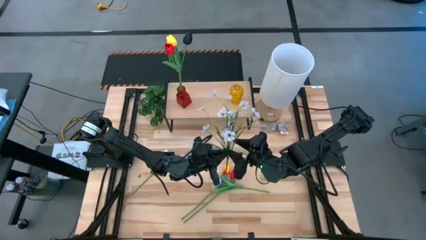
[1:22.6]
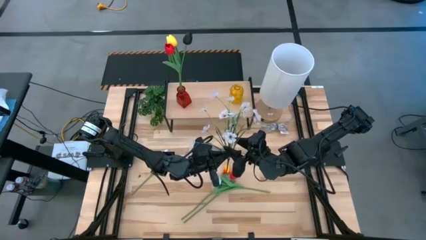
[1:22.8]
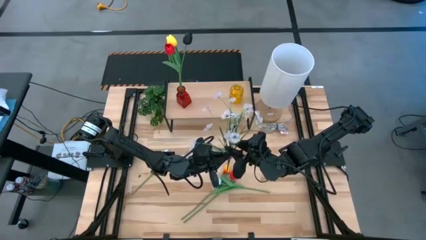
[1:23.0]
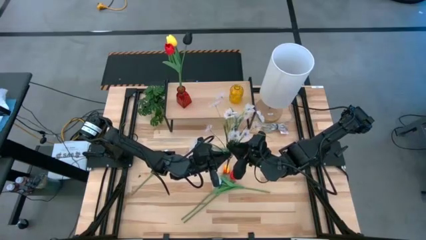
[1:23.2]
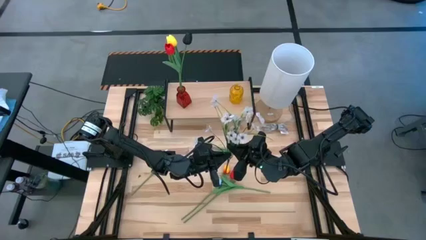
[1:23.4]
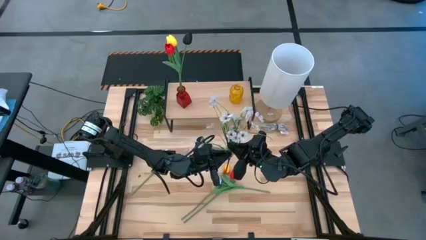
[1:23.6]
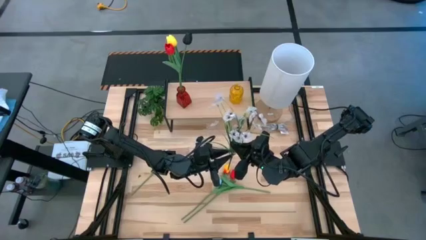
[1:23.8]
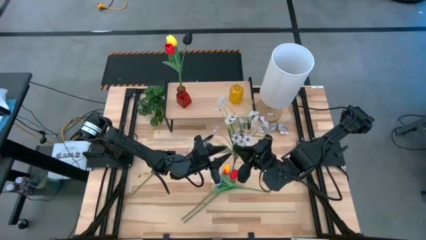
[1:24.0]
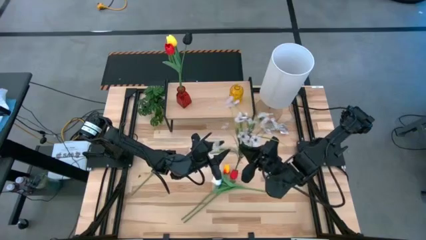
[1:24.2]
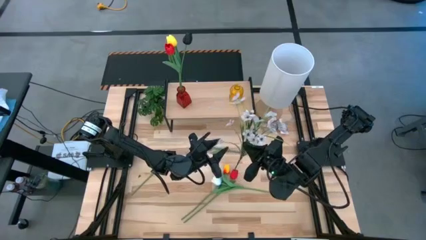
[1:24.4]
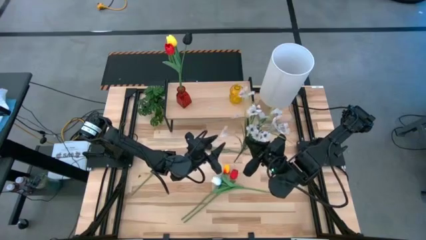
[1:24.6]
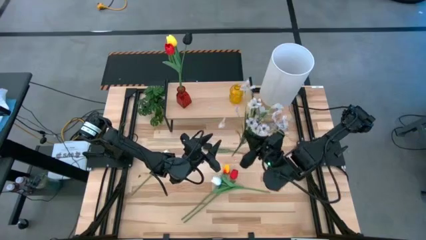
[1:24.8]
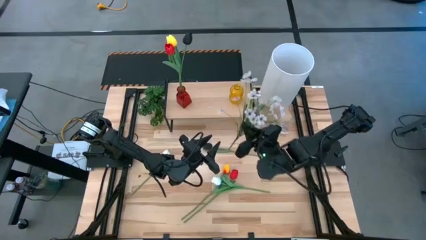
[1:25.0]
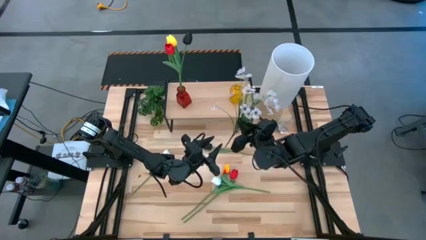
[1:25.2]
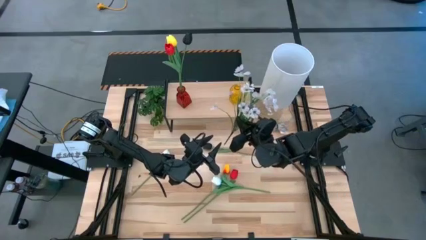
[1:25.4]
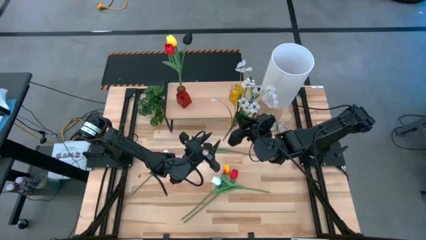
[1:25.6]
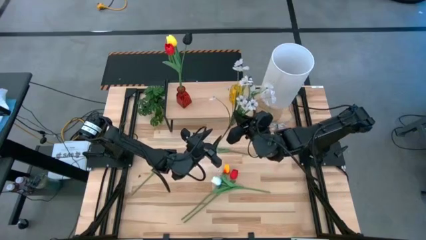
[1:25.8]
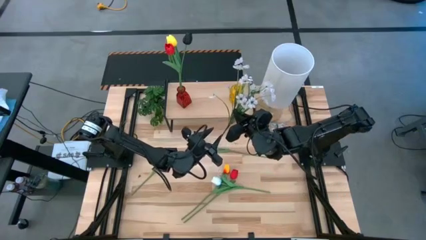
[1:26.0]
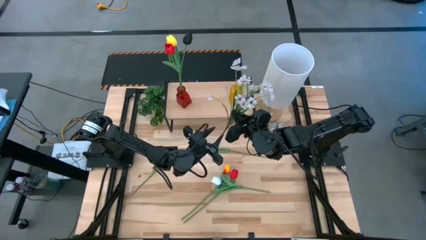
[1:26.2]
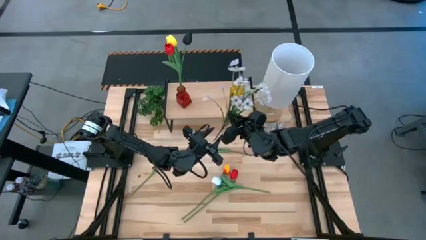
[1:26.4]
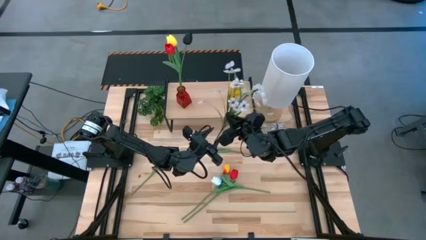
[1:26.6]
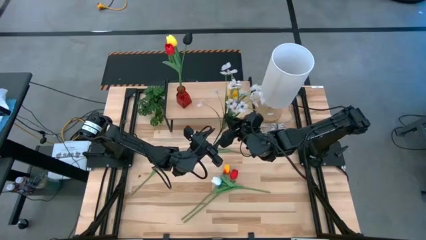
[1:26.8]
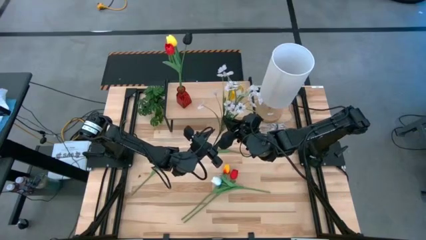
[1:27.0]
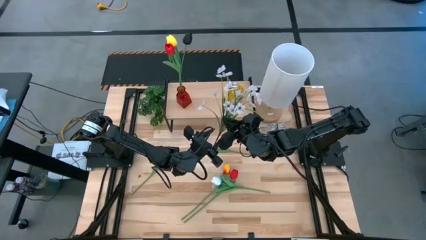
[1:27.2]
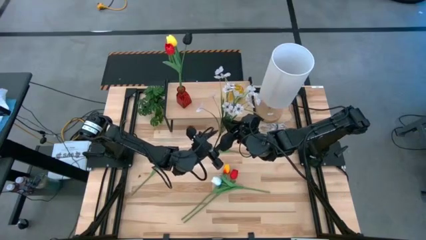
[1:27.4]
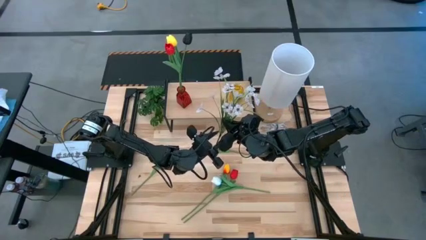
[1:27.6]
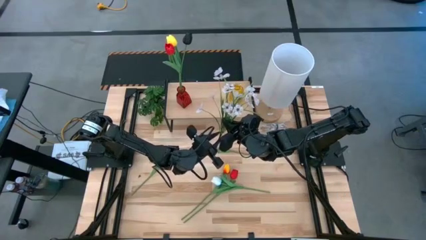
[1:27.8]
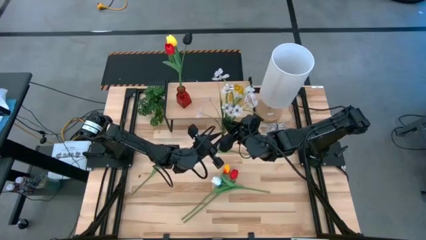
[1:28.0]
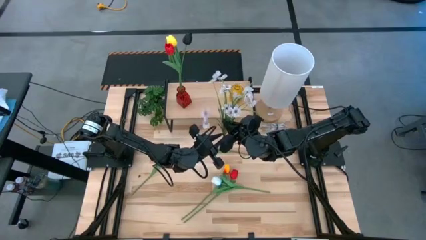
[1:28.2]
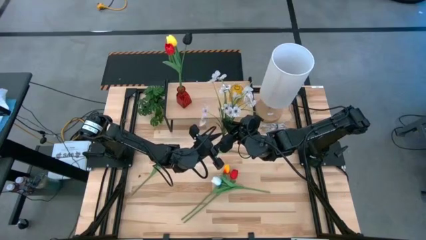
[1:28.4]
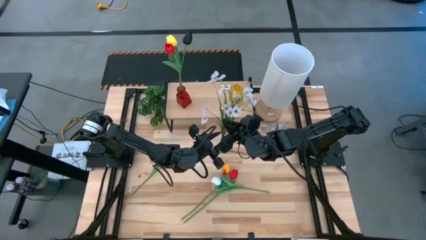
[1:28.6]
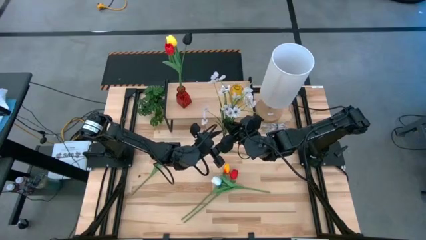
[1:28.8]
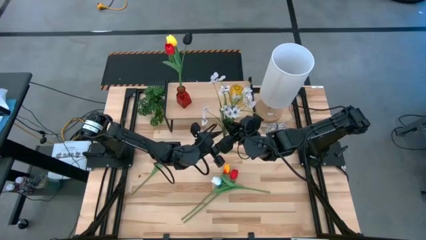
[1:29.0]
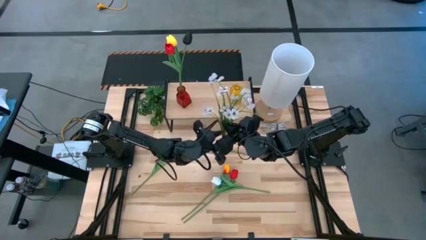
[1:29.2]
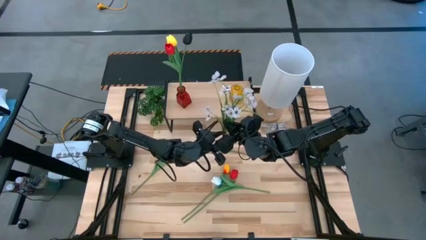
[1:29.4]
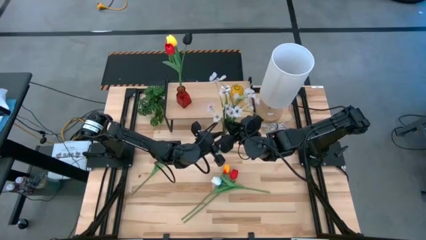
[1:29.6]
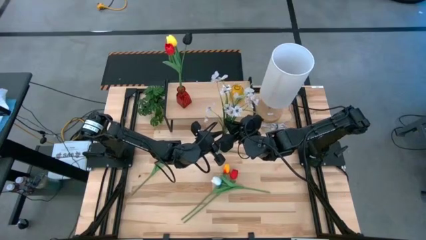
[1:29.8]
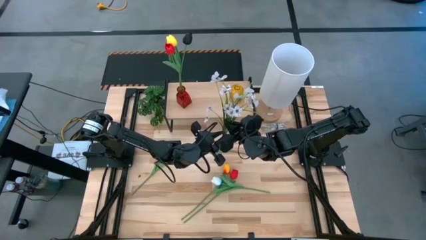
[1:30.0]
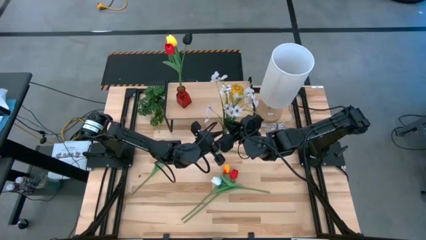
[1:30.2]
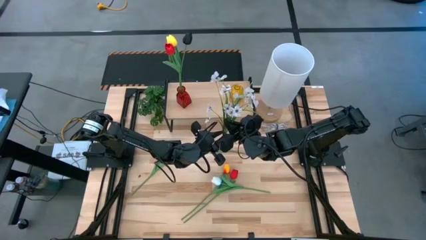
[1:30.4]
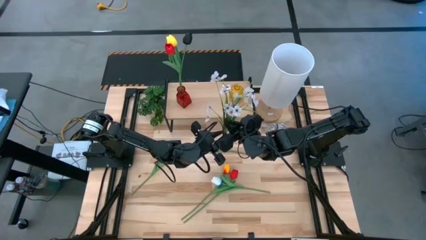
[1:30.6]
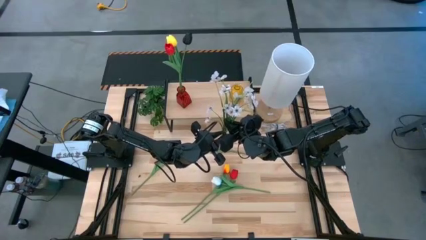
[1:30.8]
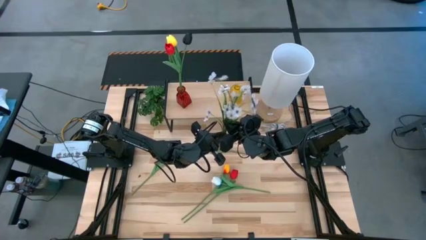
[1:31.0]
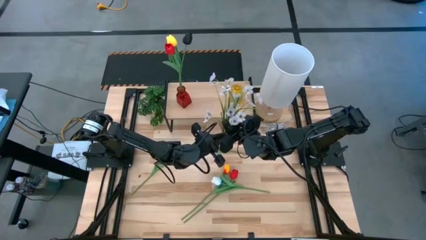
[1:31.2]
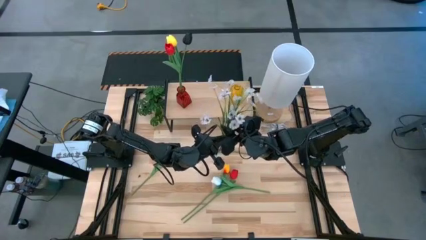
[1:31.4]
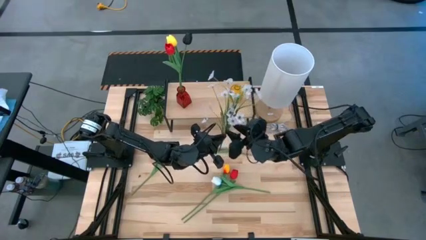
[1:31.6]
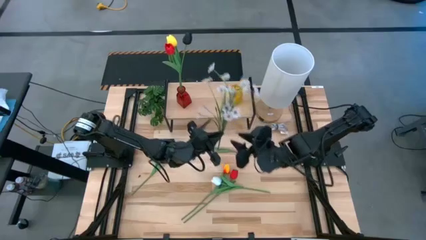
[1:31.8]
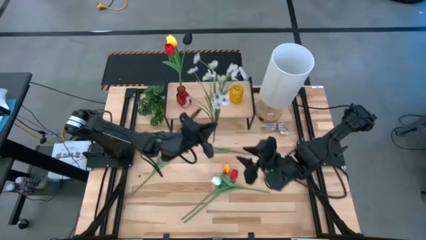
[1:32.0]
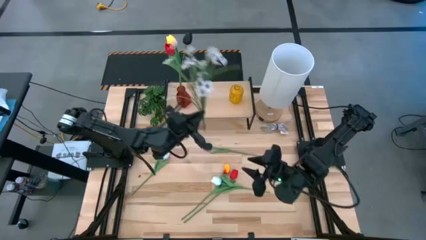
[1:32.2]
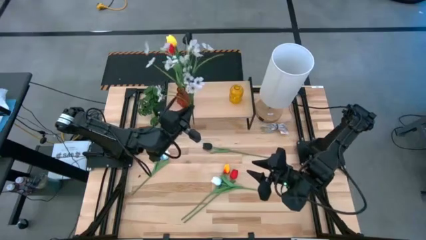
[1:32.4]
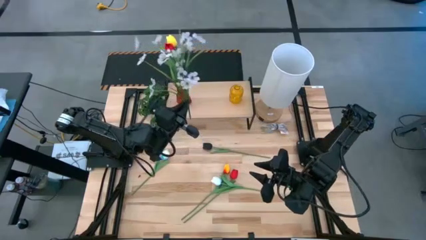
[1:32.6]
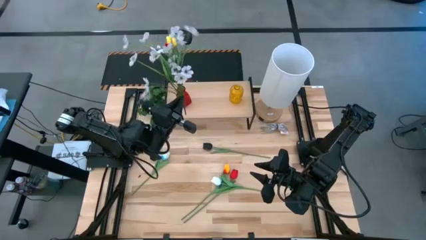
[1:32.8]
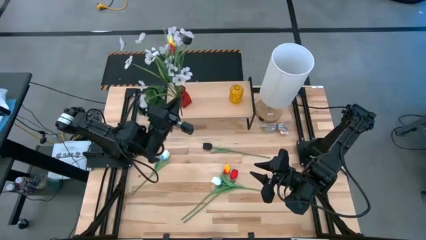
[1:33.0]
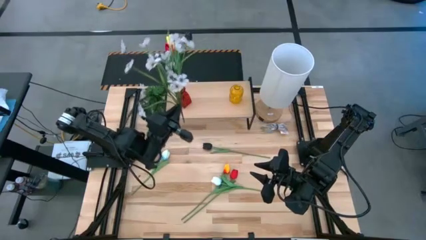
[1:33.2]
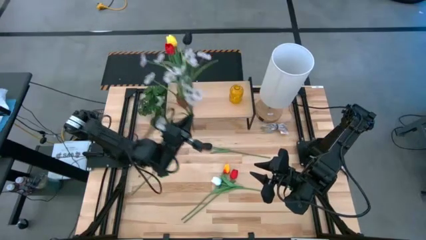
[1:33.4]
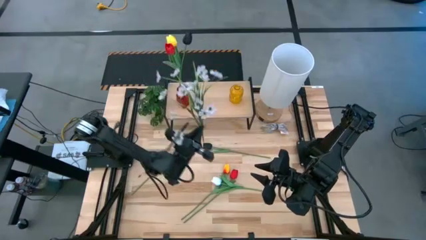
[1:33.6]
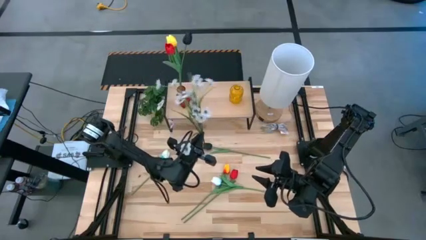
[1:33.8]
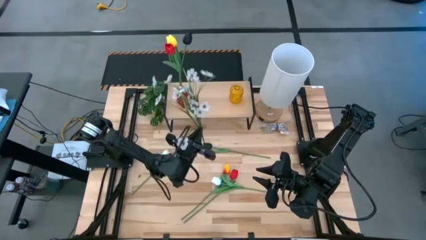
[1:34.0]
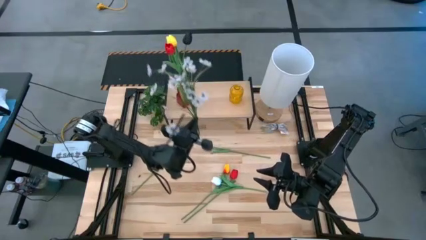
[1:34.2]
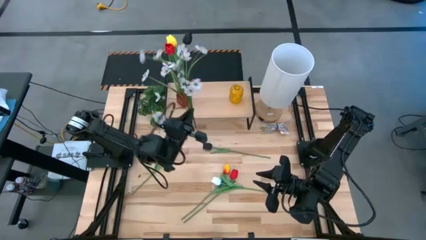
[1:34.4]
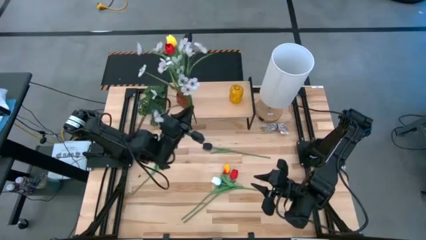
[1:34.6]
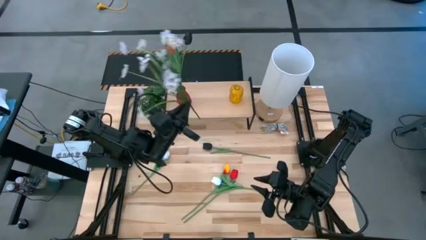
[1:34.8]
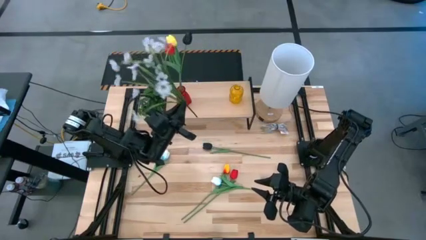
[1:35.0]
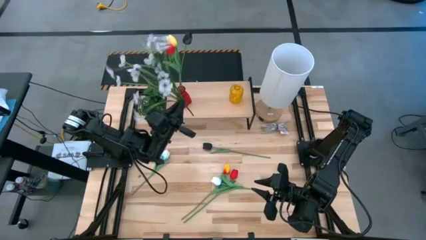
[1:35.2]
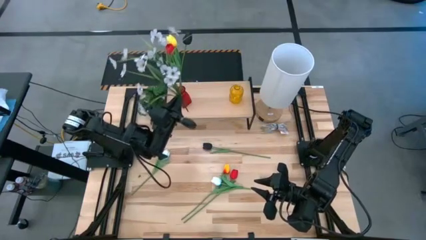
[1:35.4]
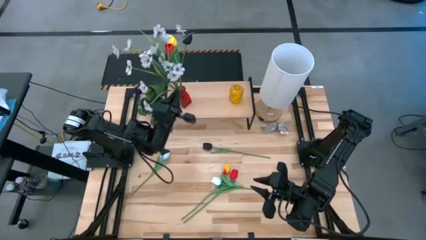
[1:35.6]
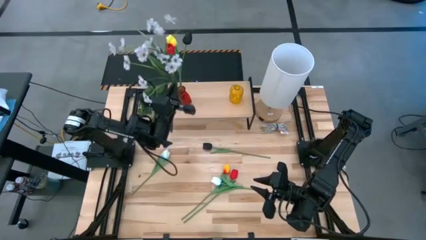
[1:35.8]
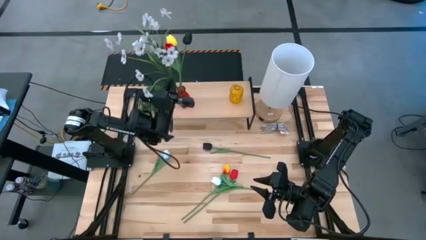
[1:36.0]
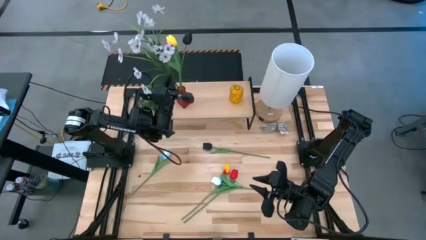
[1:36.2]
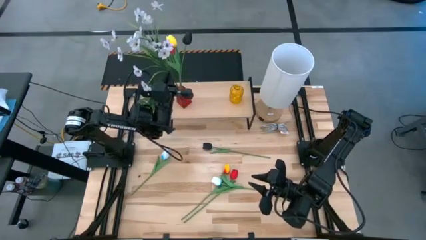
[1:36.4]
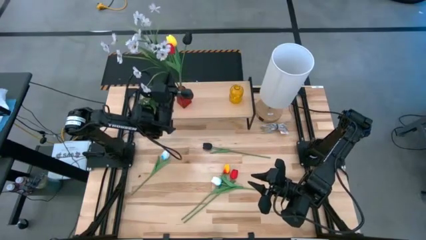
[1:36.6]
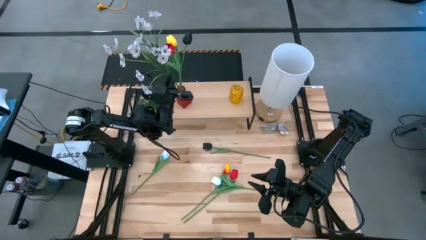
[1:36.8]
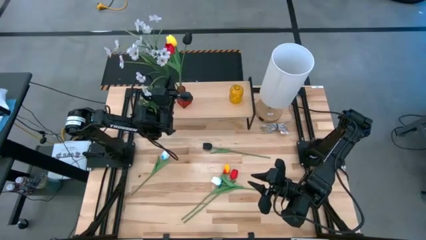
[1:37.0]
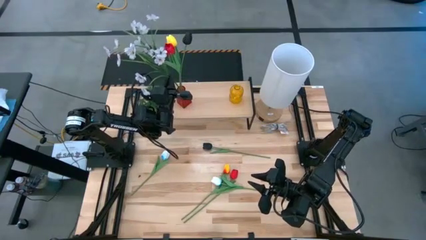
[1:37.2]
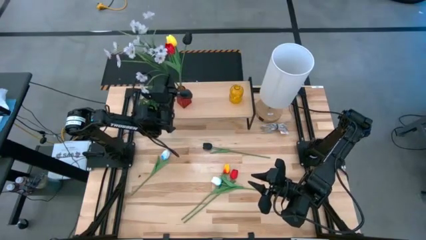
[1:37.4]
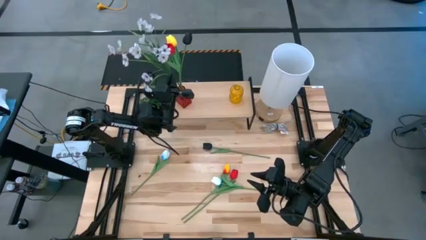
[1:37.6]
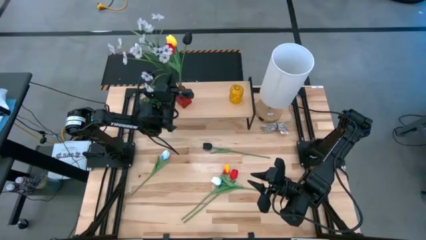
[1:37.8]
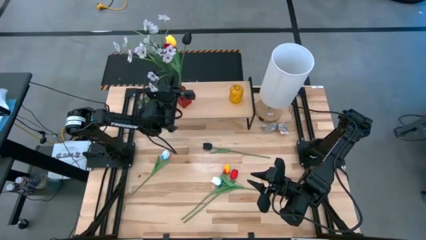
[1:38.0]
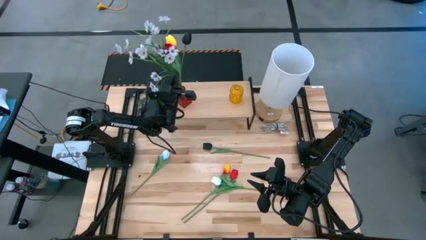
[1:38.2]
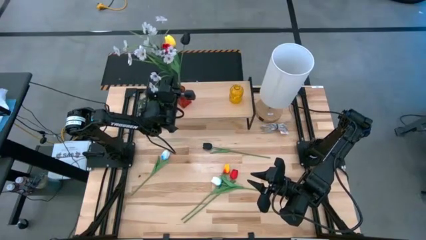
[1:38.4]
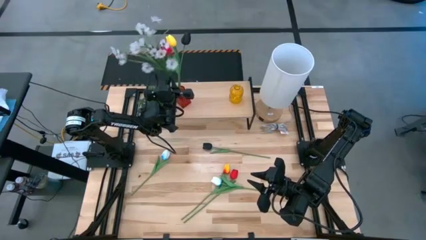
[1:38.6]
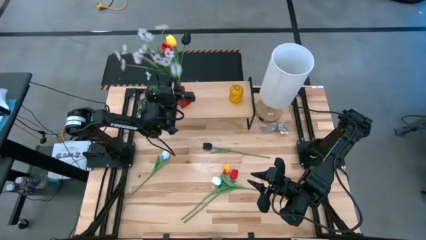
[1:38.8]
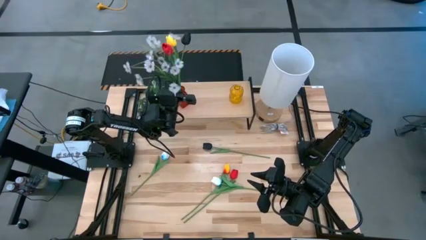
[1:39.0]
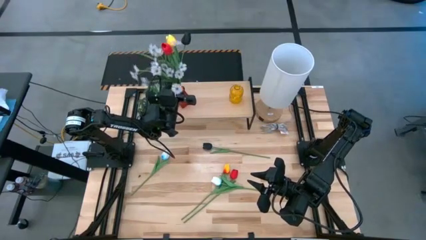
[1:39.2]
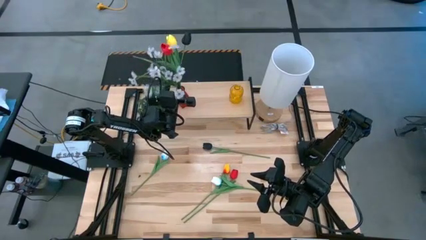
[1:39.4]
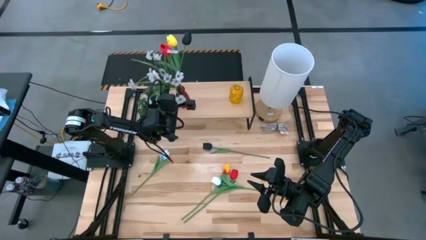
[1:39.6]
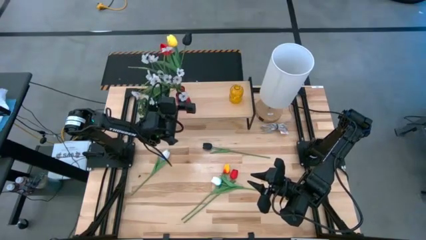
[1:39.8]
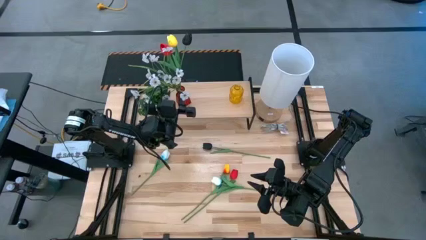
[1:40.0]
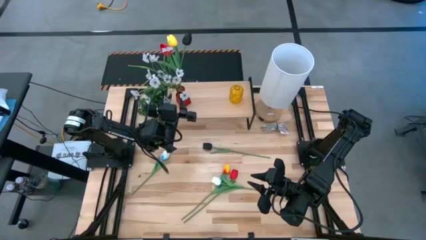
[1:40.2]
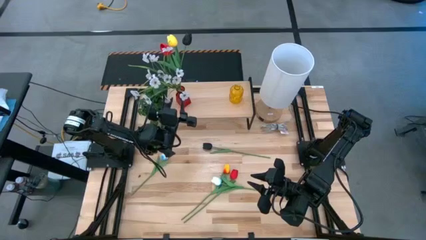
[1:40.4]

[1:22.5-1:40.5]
Task: Pick and place flowers into a vace then onto a shelf
Put the white flowers into the red vase on the shelf
